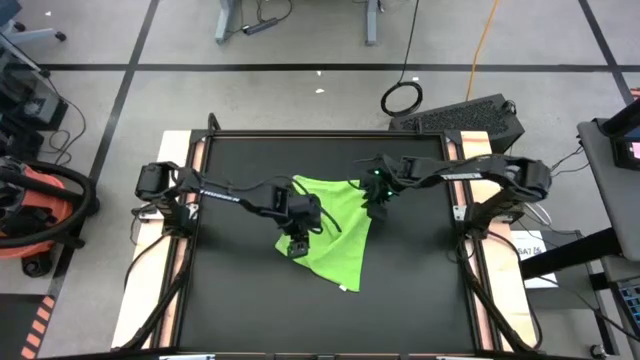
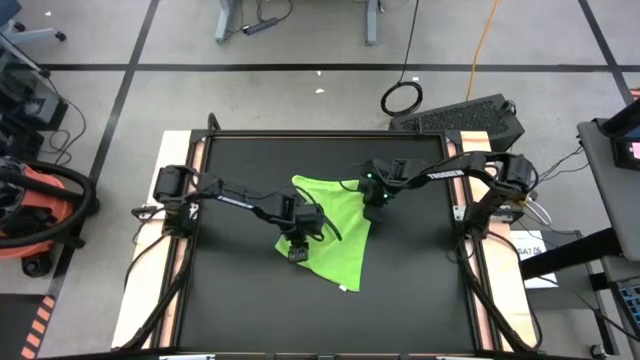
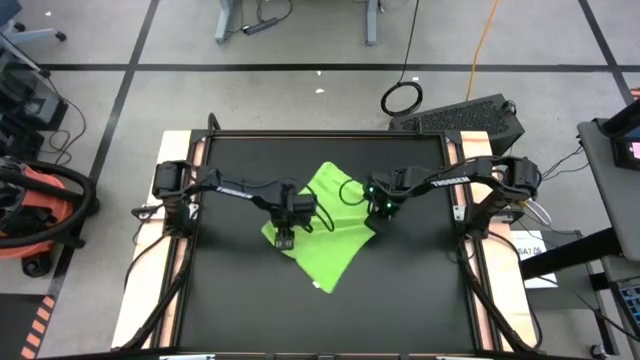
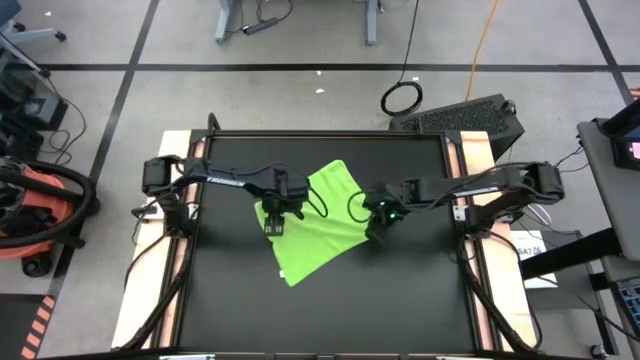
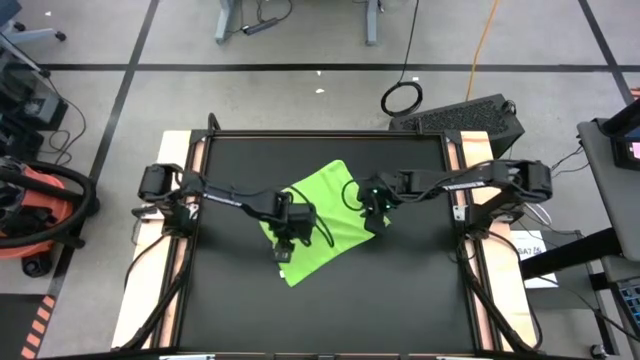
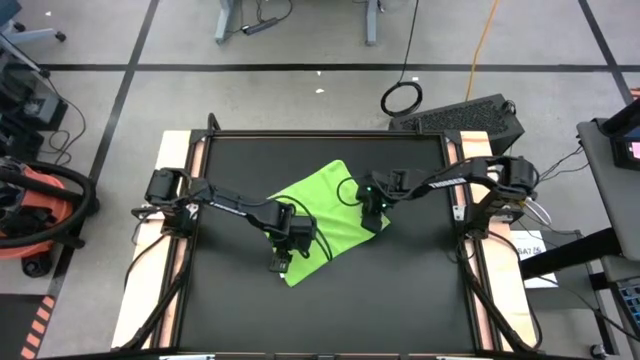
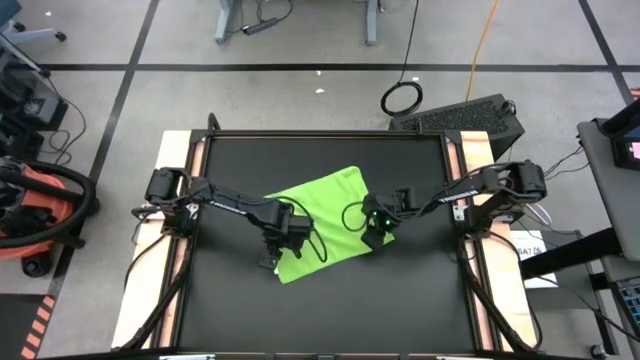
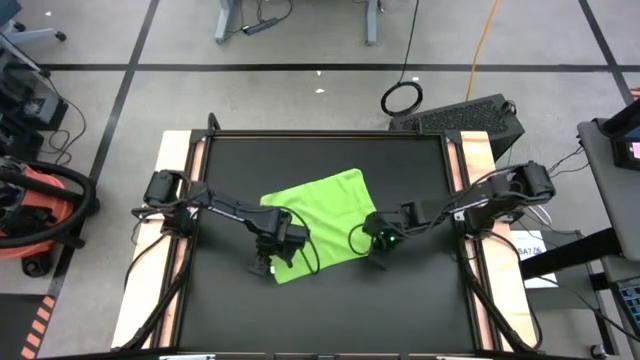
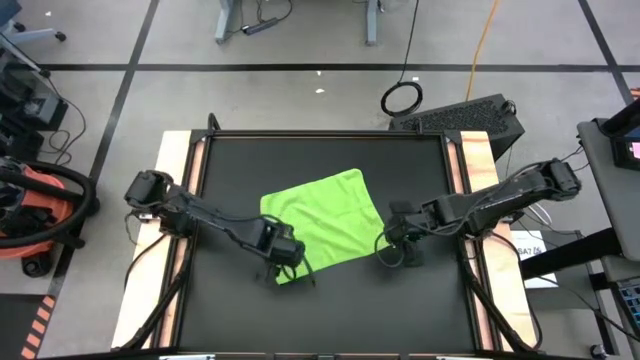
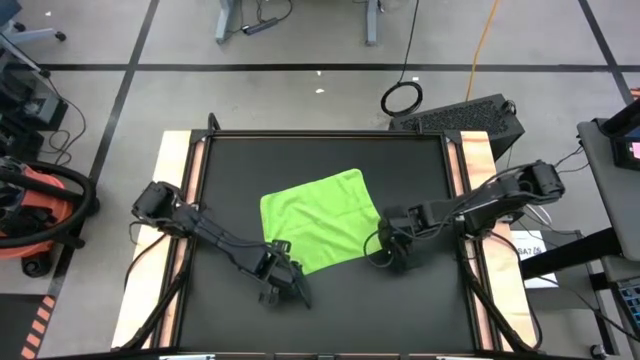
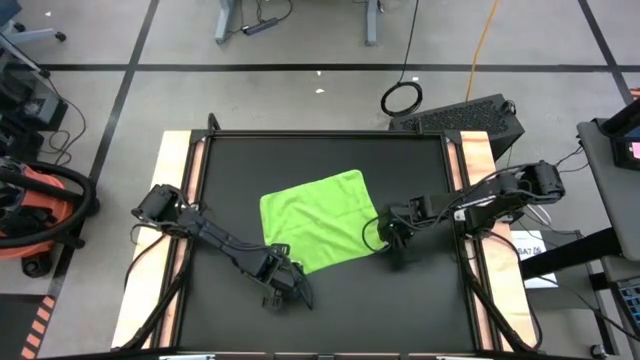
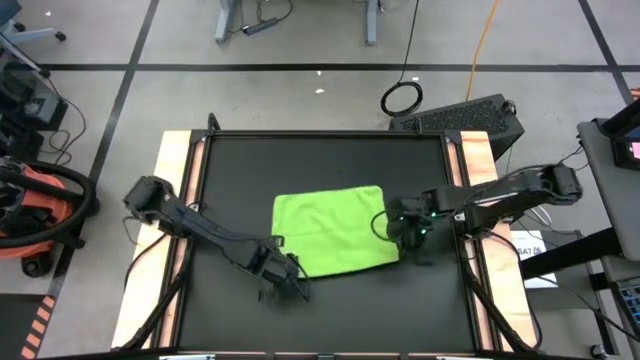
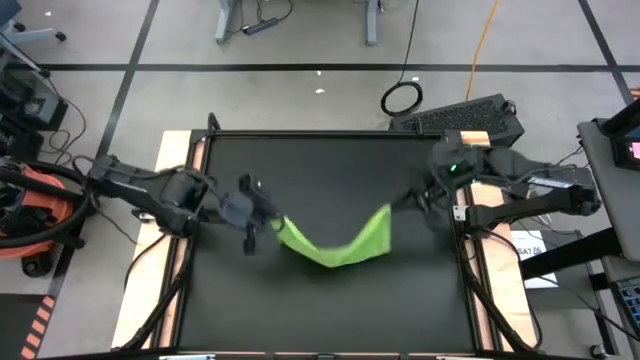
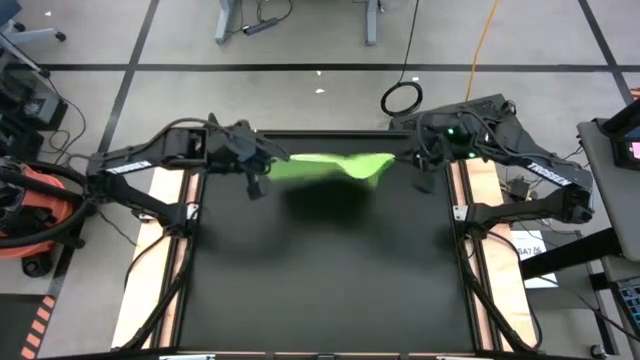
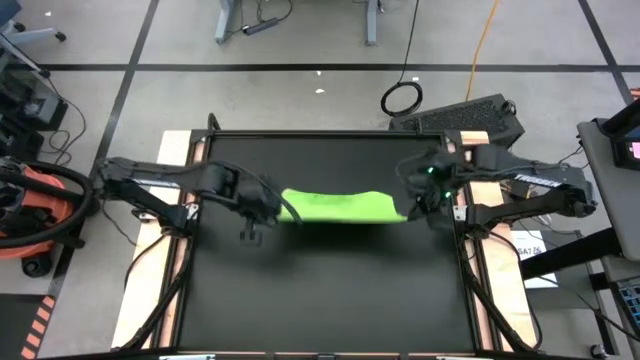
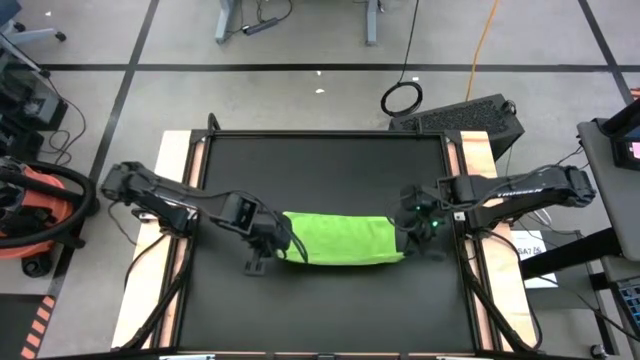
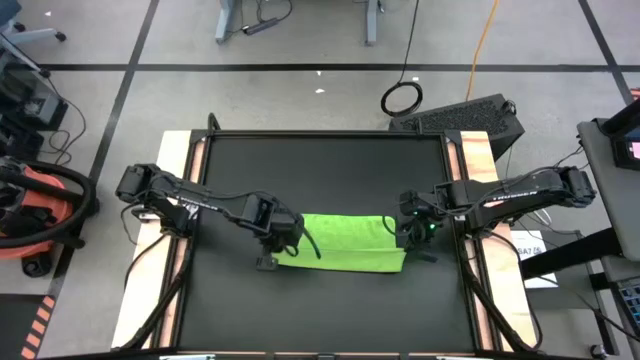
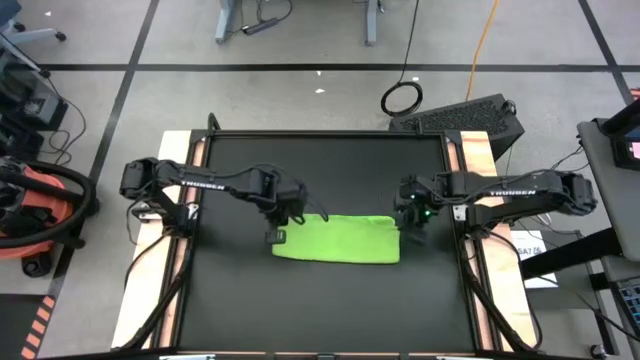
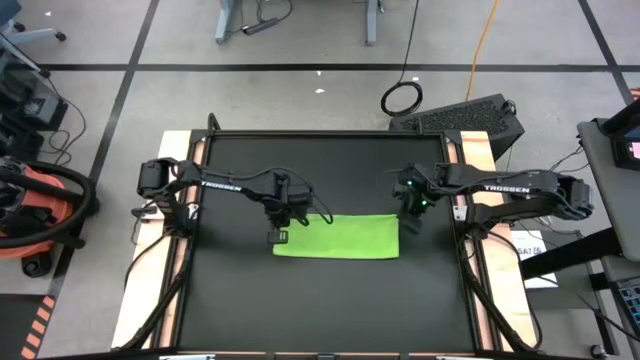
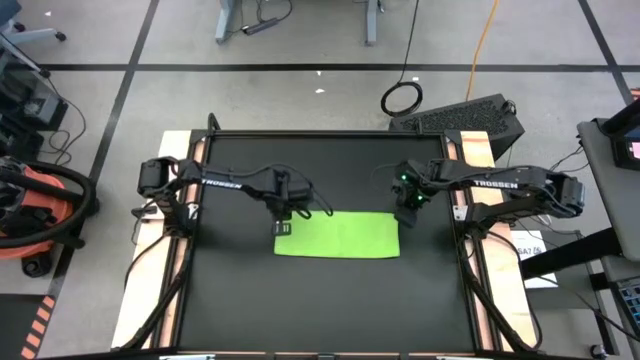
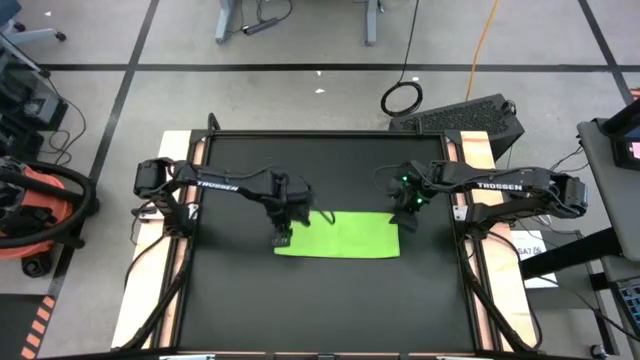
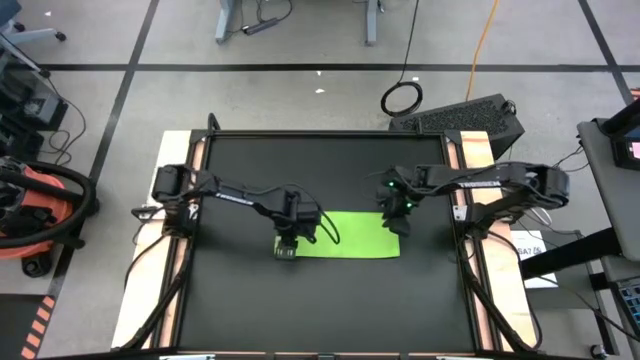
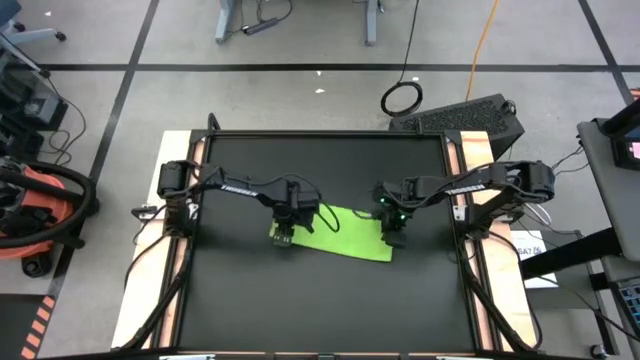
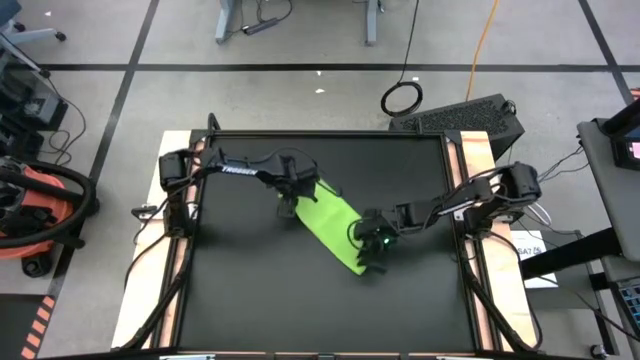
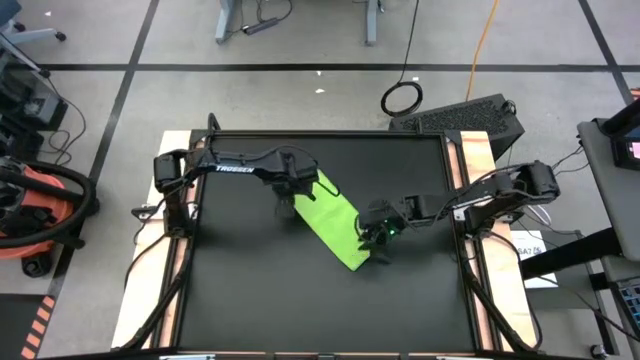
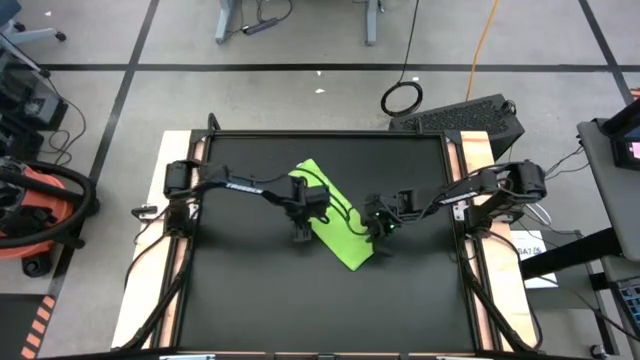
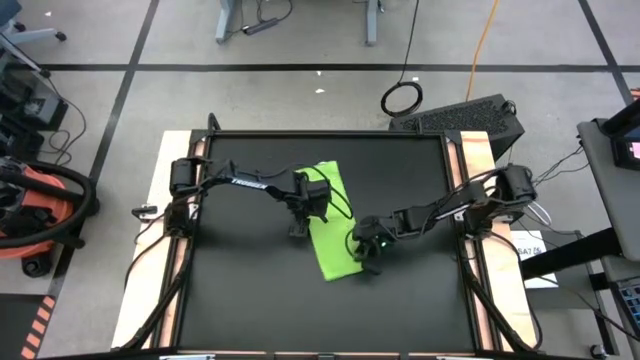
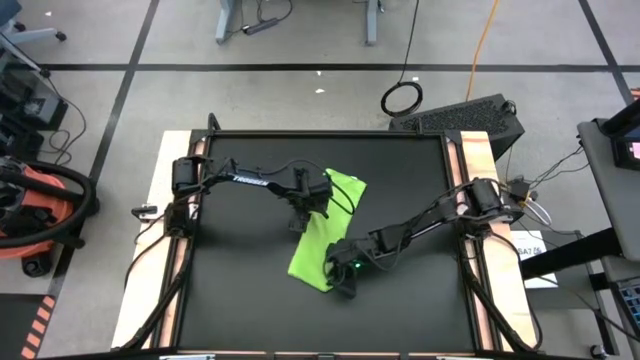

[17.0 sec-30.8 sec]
Task: Roll towel
Fold the green microfiber cloth
